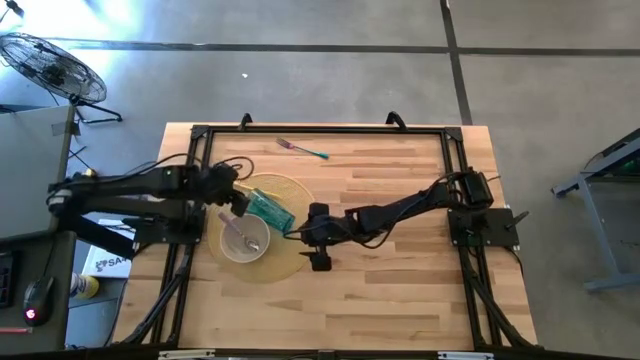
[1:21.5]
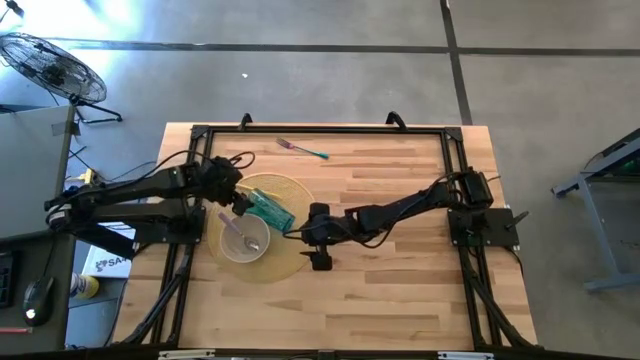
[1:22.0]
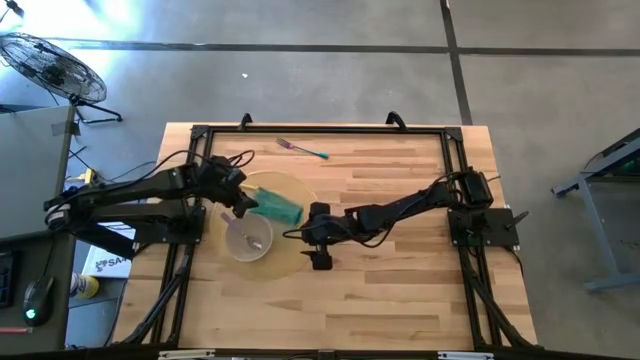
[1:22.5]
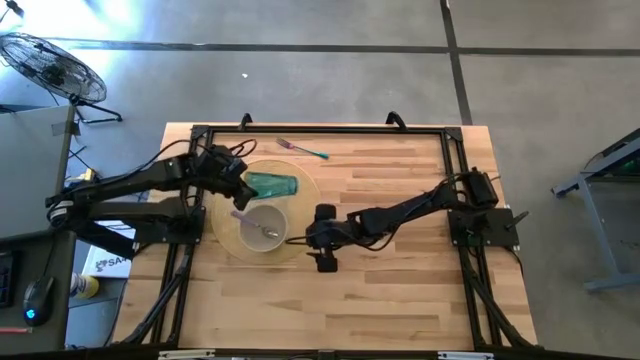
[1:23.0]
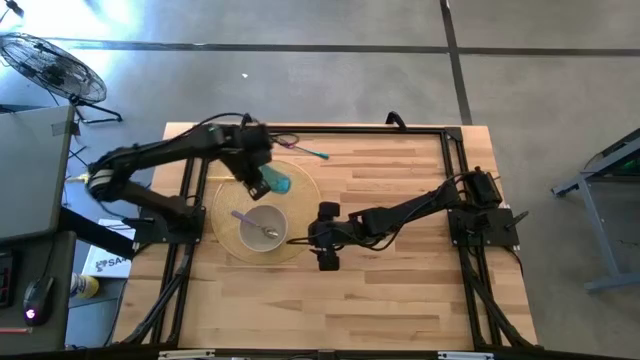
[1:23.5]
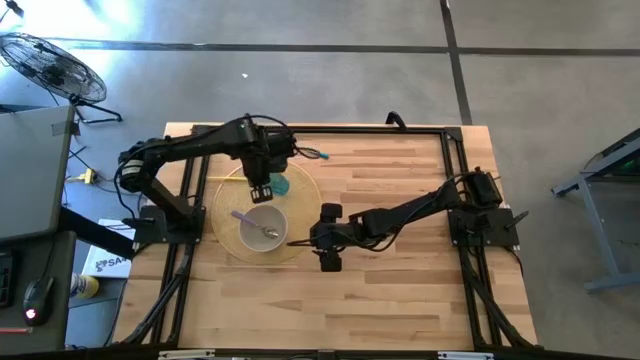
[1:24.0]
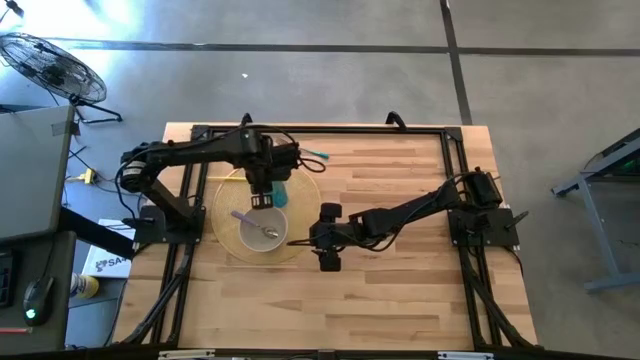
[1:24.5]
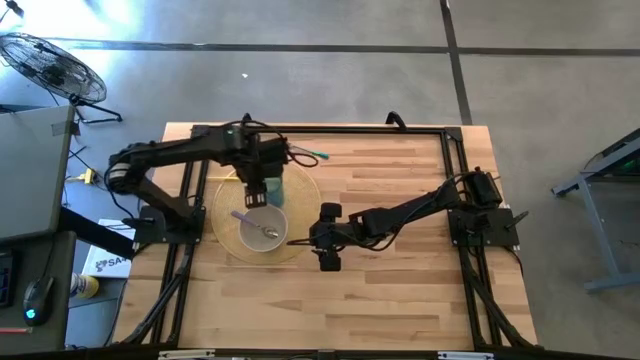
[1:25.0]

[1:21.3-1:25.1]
Task: Pick & Place Utensil
Adjust the blue cup on the brown mat

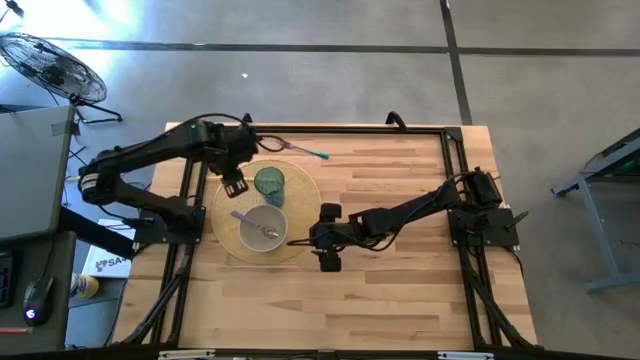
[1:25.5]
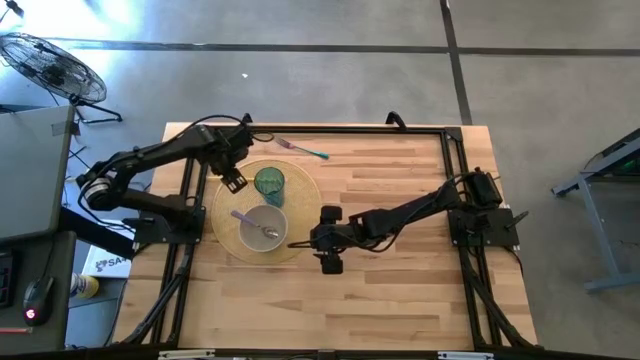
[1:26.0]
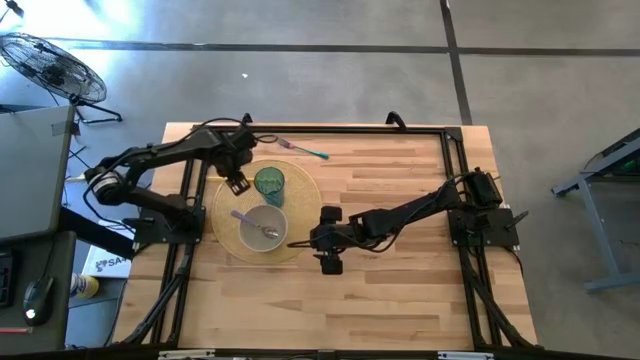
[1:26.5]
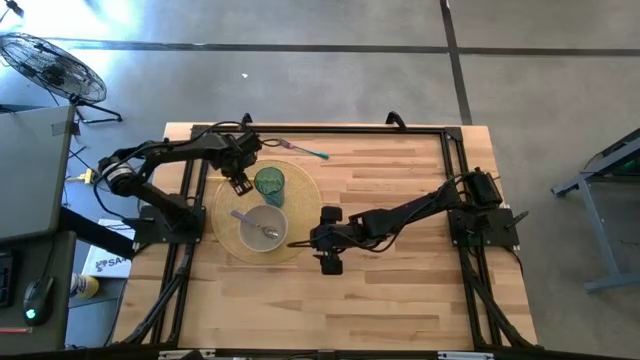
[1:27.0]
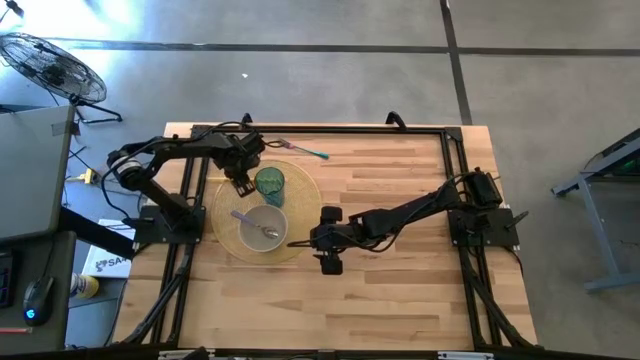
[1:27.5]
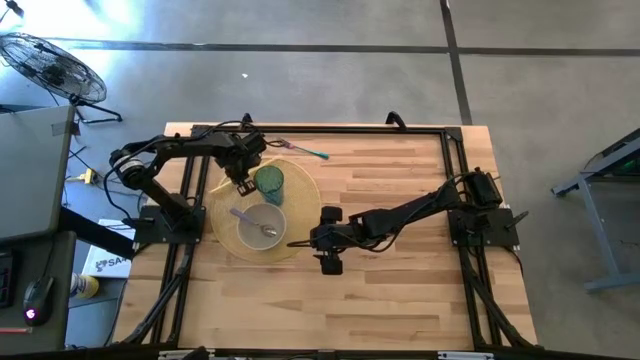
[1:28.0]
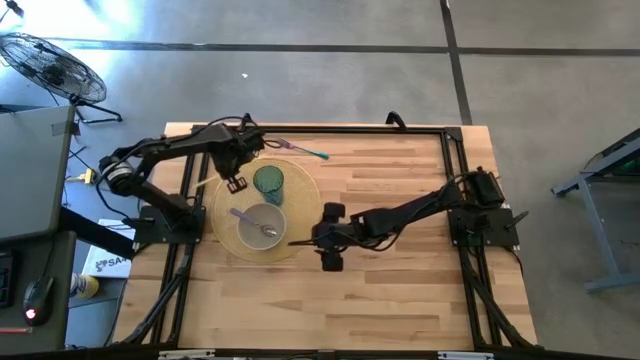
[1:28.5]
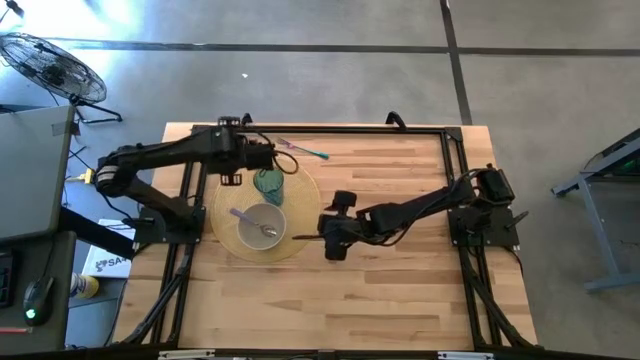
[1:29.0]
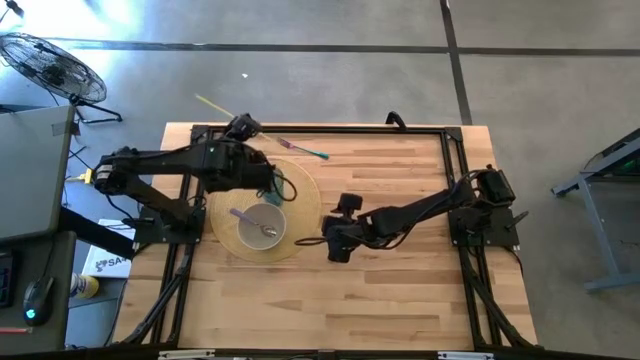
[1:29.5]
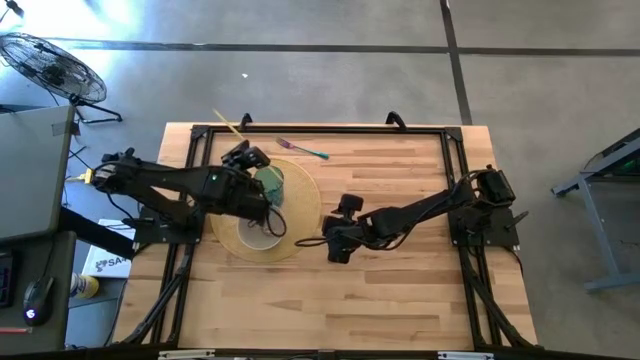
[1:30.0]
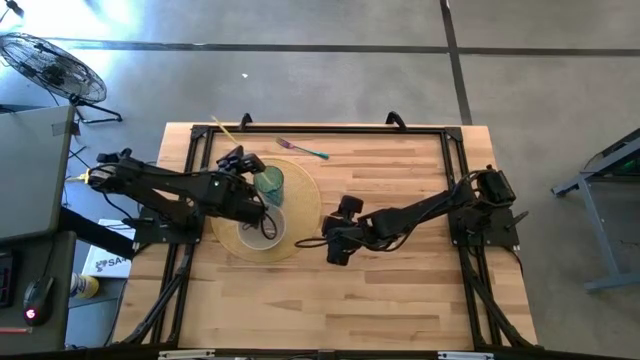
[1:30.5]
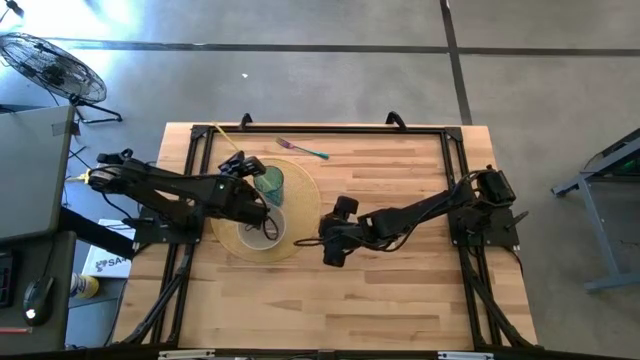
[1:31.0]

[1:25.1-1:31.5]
Put the yellow straw into the blue cup

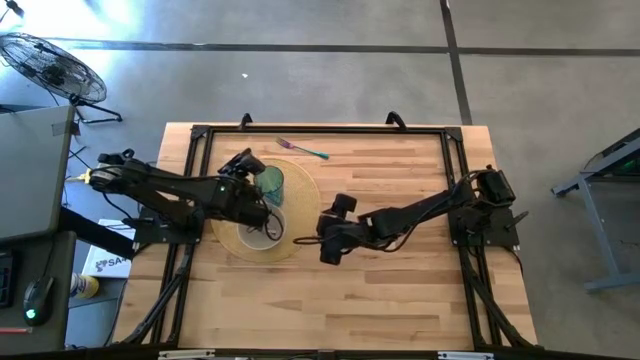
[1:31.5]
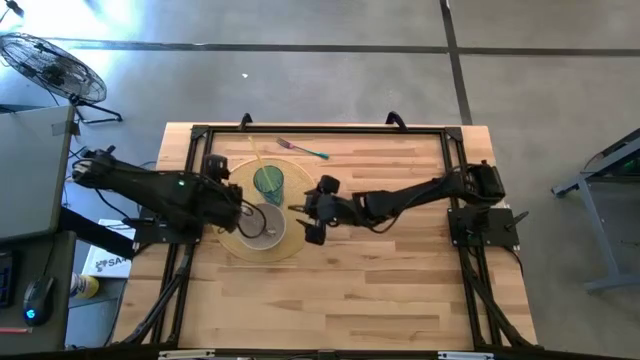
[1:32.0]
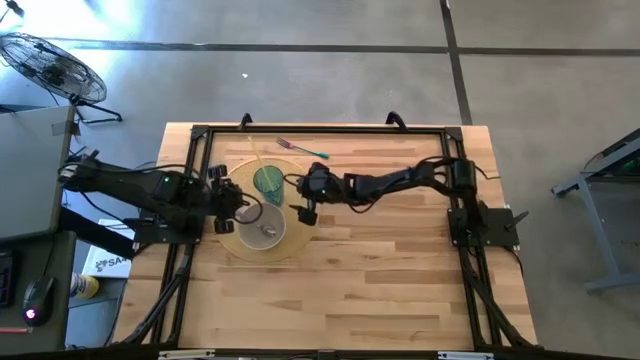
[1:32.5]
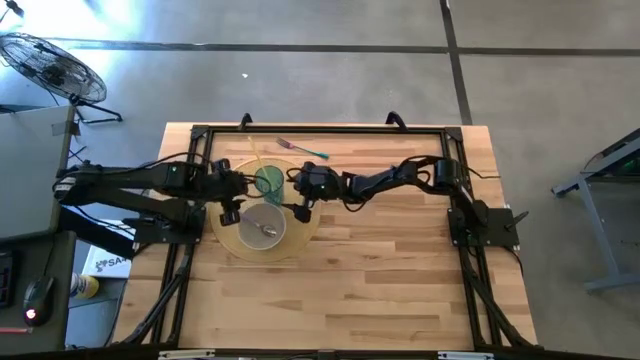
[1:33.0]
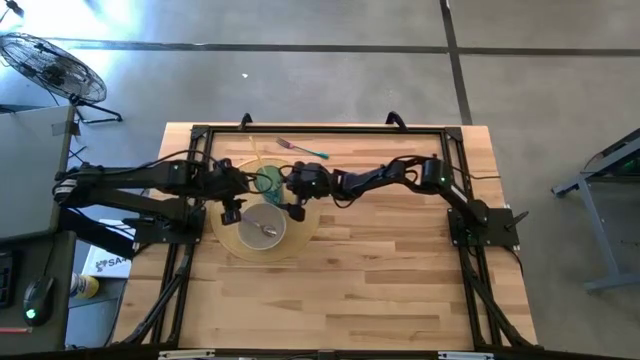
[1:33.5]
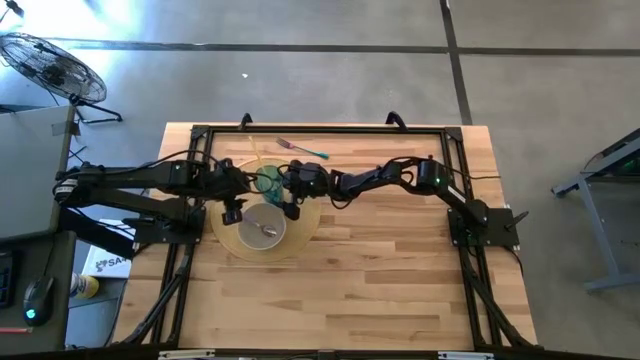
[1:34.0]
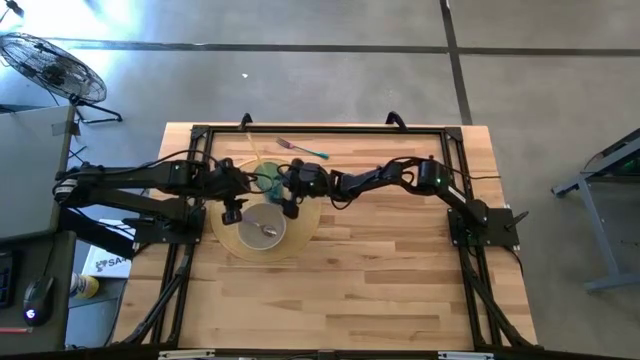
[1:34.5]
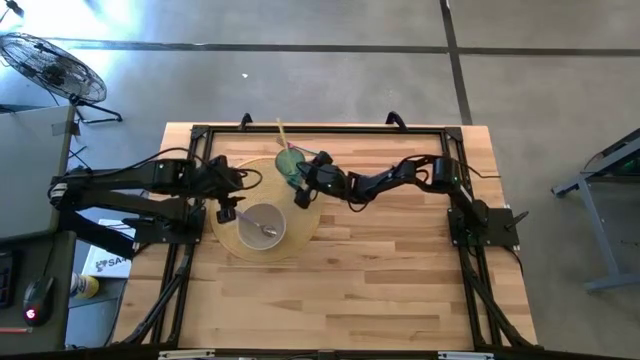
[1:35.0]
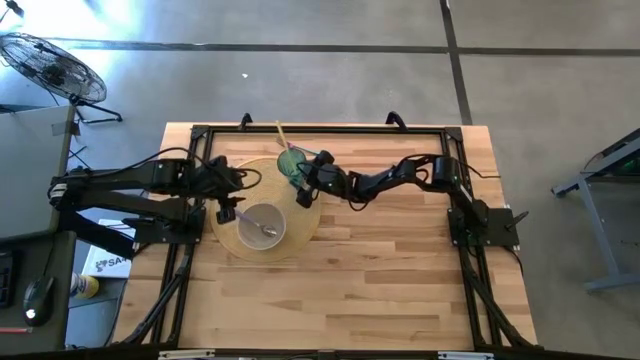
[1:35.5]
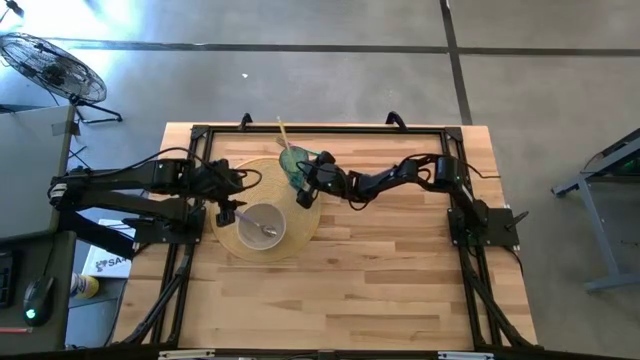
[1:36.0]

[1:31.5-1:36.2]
Adjust the blue cup on the brown mat

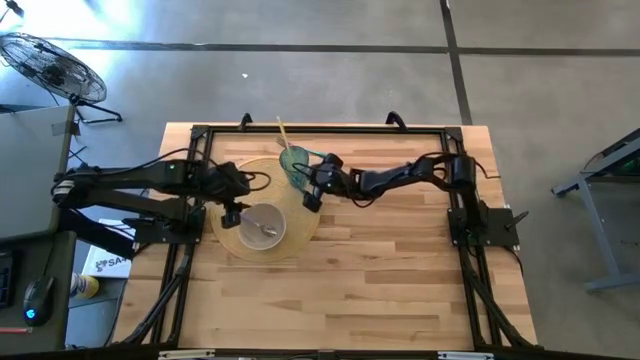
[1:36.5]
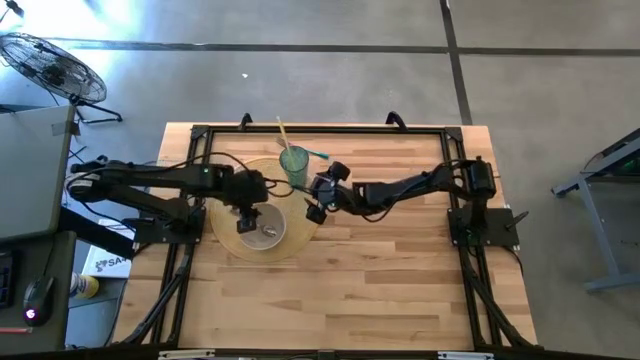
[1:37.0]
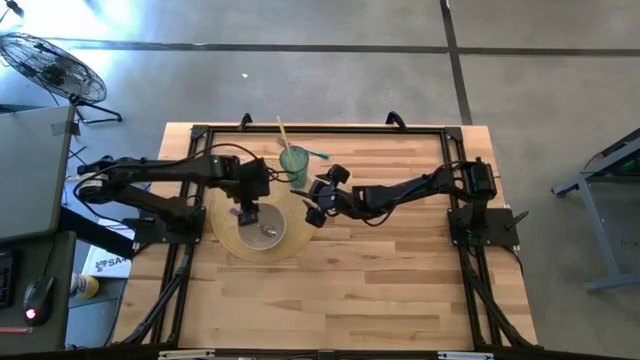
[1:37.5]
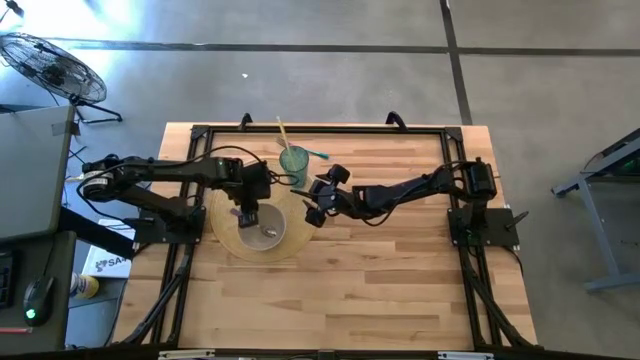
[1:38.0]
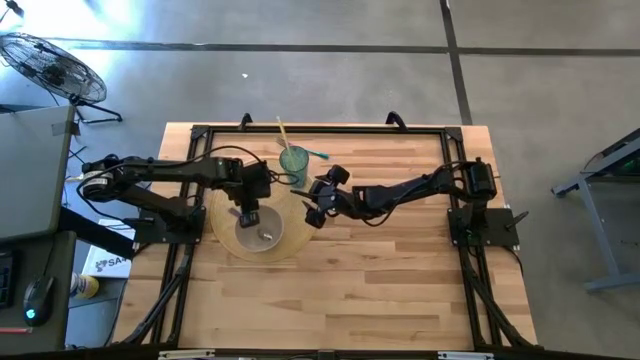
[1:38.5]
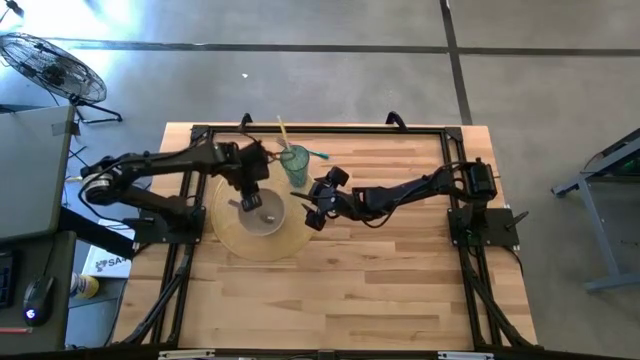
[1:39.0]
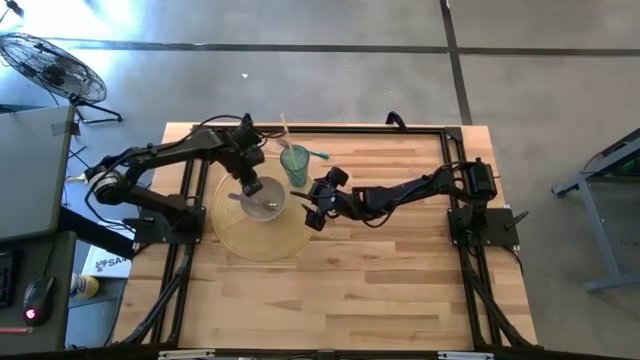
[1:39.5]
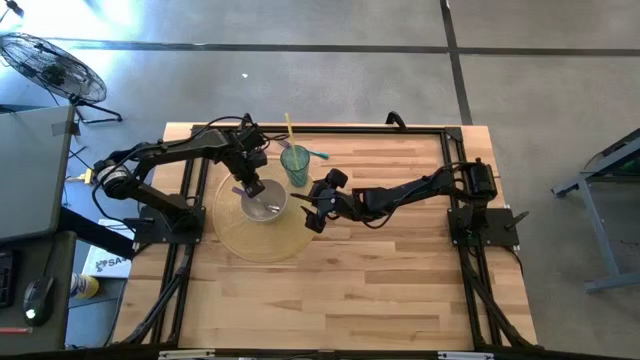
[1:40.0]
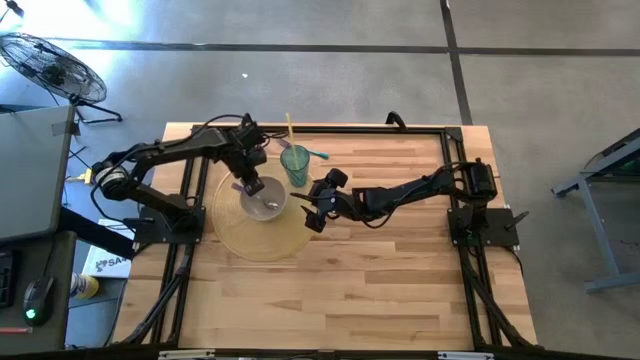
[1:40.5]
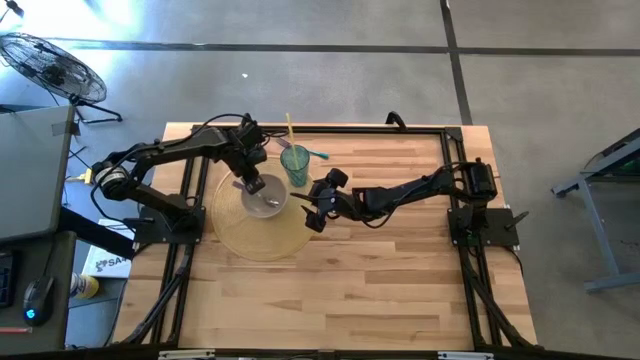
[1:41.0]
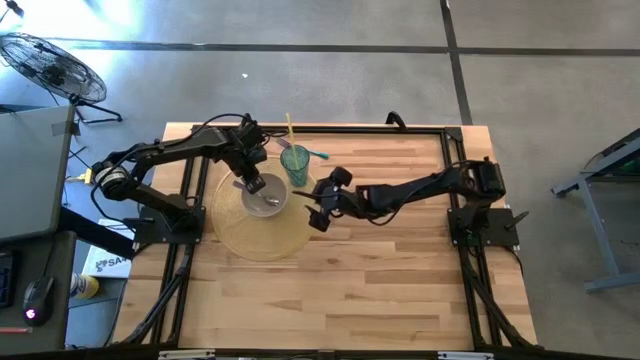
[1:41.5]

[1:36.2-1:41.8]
Adjust the white bowl on the brown mat
